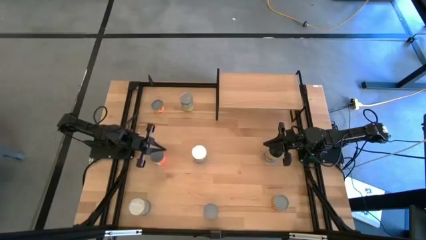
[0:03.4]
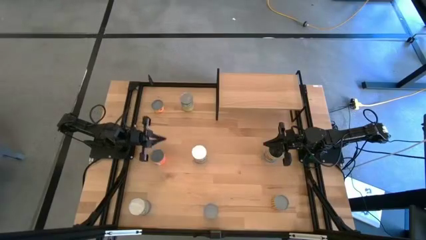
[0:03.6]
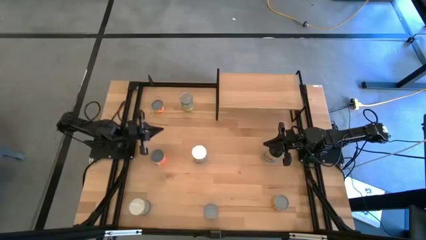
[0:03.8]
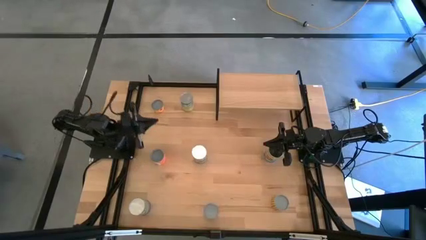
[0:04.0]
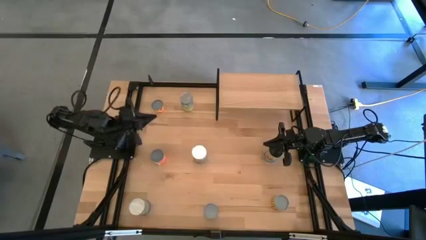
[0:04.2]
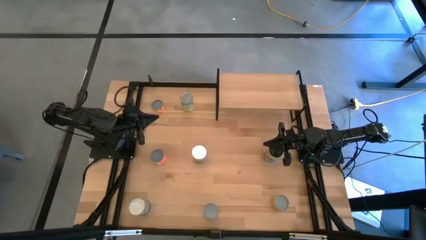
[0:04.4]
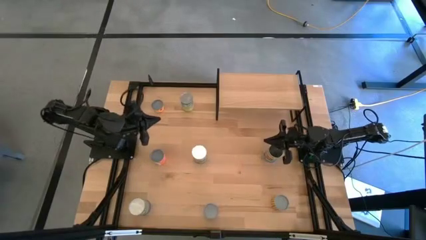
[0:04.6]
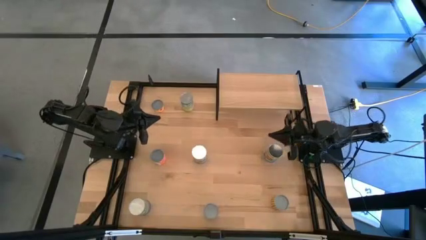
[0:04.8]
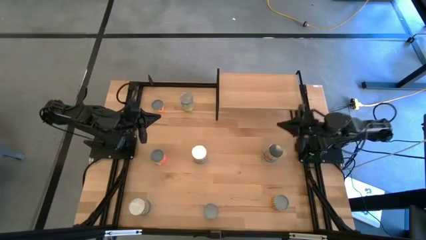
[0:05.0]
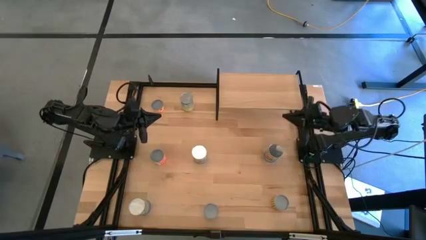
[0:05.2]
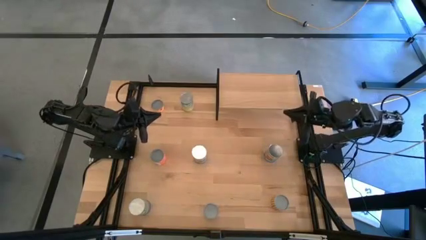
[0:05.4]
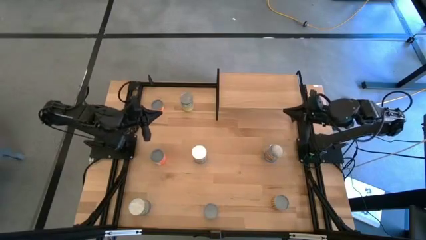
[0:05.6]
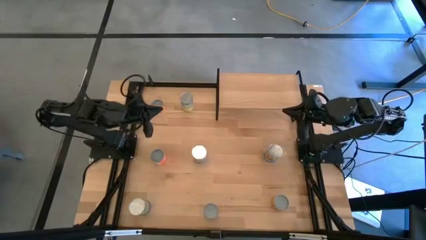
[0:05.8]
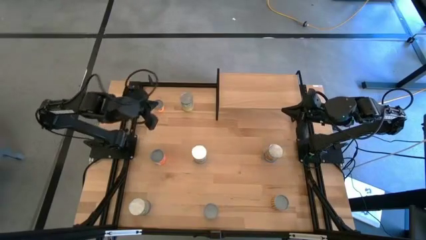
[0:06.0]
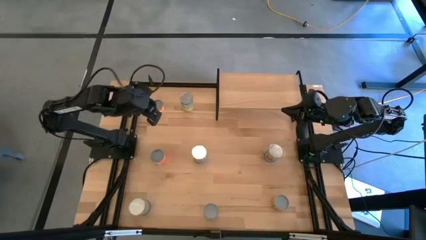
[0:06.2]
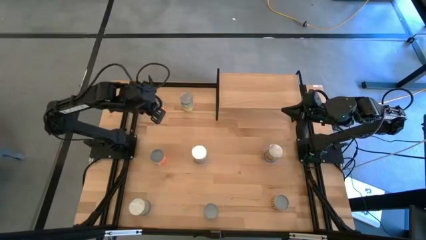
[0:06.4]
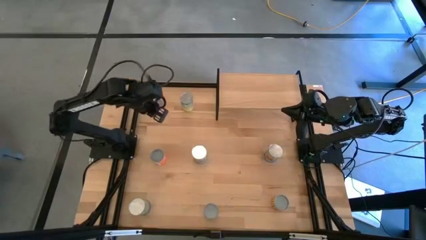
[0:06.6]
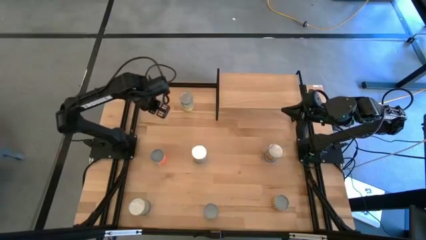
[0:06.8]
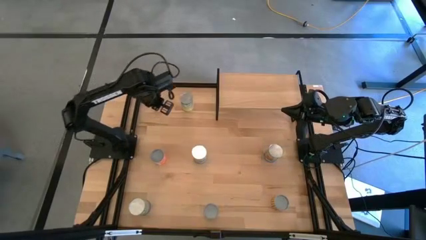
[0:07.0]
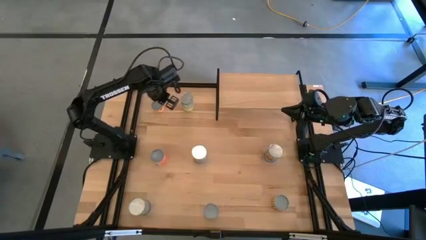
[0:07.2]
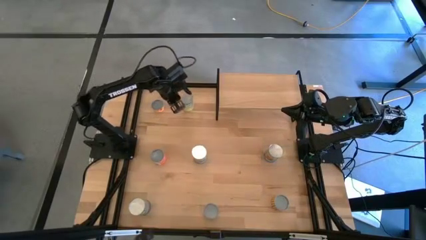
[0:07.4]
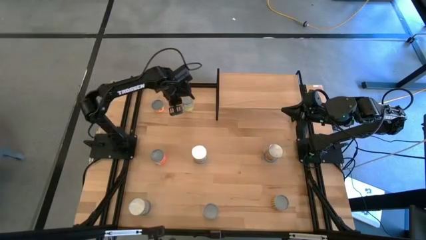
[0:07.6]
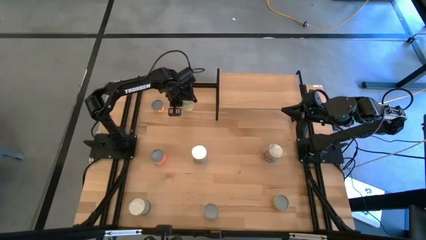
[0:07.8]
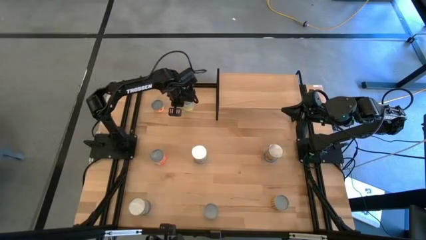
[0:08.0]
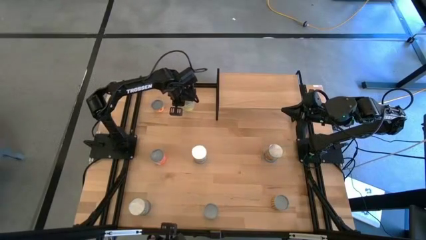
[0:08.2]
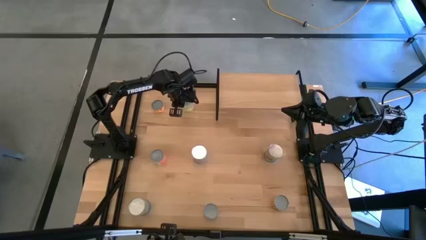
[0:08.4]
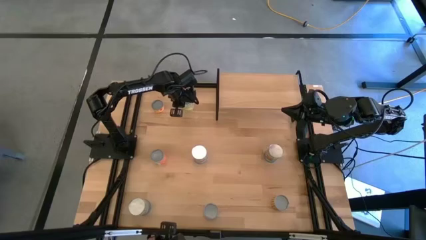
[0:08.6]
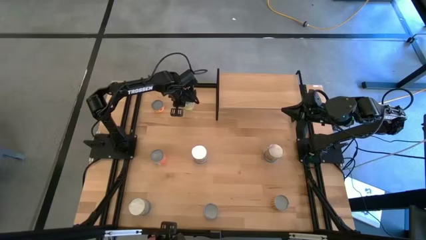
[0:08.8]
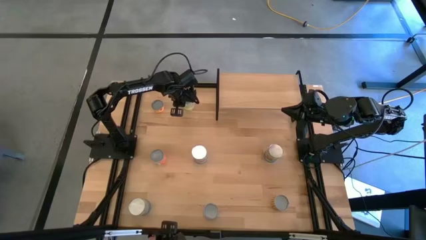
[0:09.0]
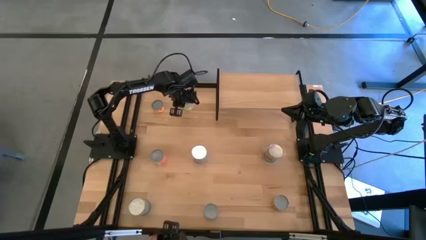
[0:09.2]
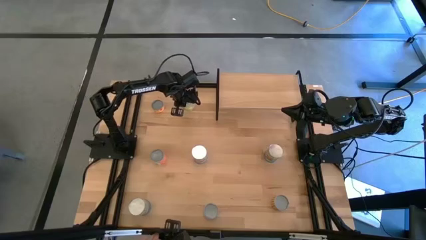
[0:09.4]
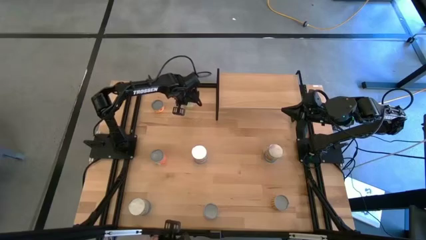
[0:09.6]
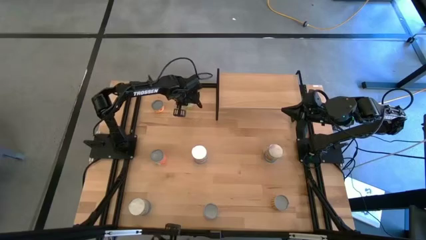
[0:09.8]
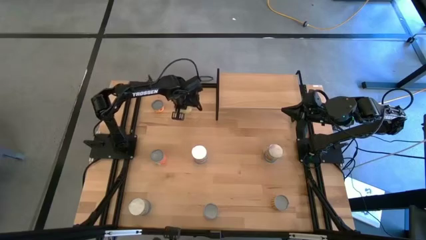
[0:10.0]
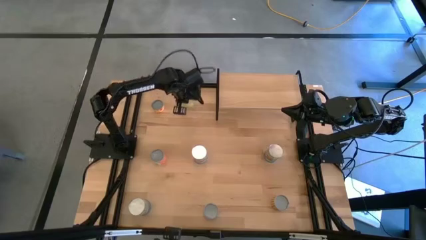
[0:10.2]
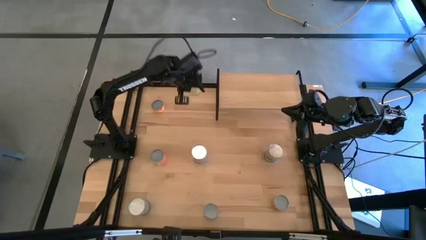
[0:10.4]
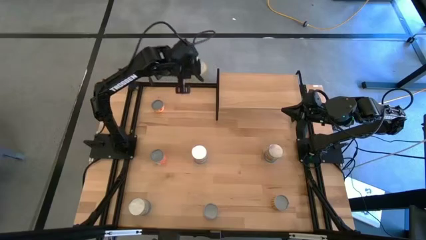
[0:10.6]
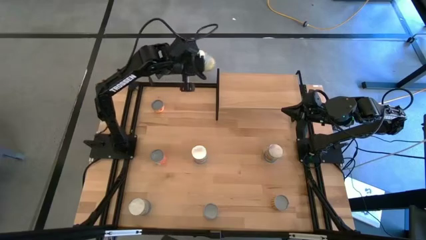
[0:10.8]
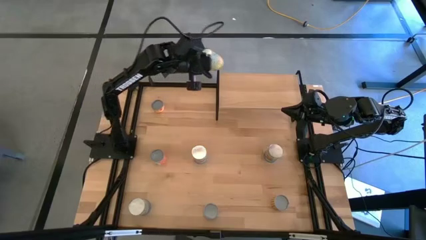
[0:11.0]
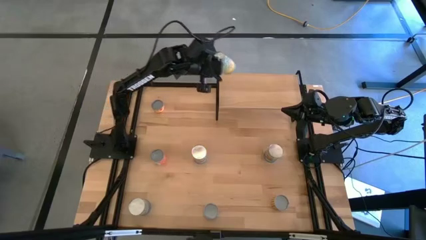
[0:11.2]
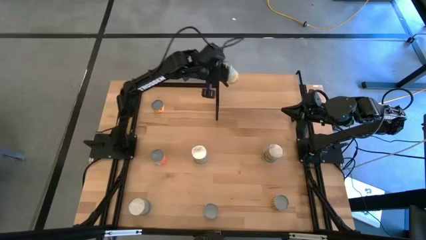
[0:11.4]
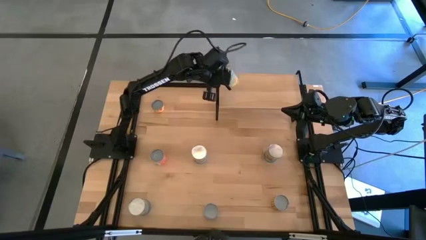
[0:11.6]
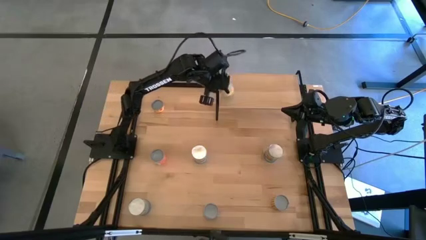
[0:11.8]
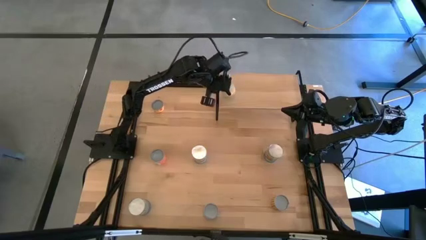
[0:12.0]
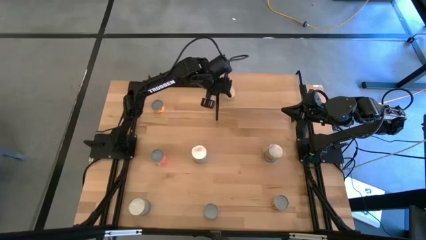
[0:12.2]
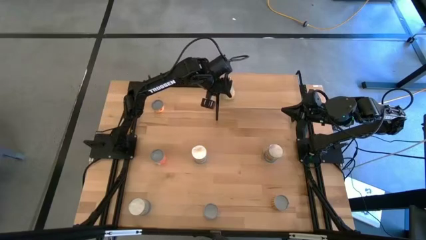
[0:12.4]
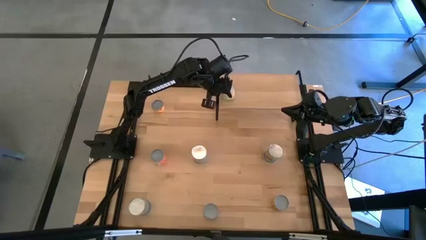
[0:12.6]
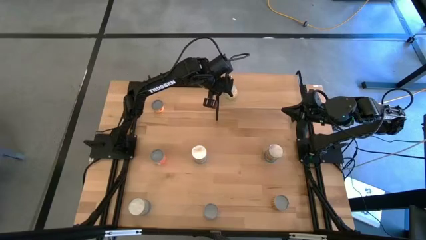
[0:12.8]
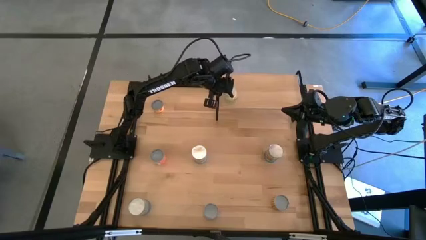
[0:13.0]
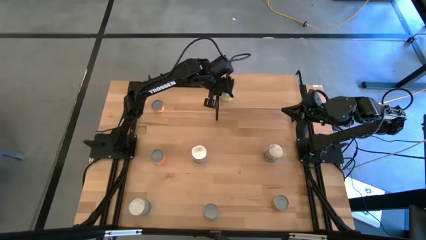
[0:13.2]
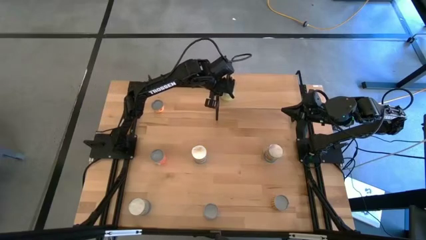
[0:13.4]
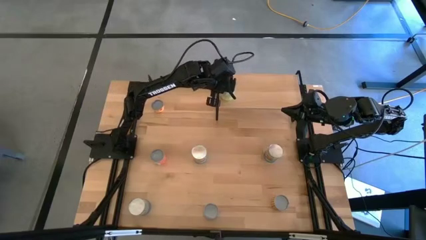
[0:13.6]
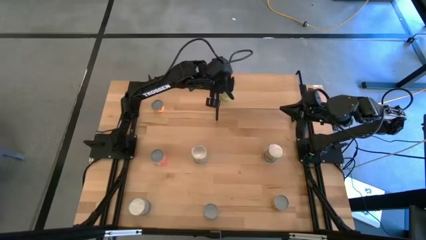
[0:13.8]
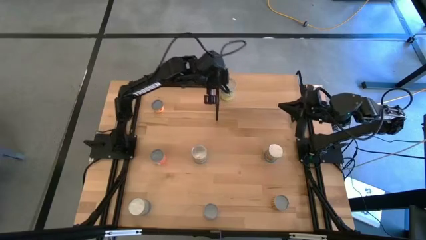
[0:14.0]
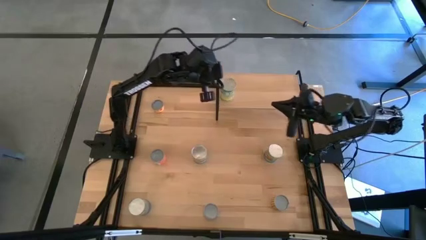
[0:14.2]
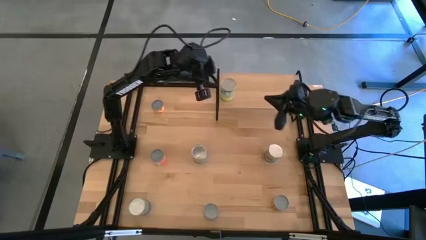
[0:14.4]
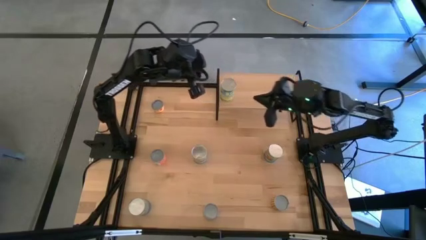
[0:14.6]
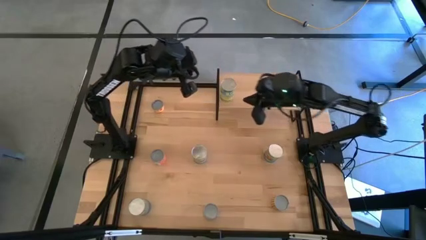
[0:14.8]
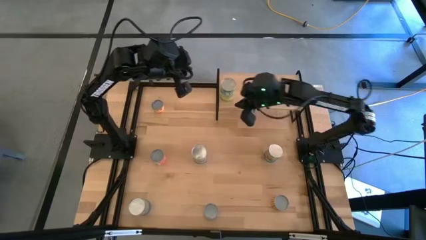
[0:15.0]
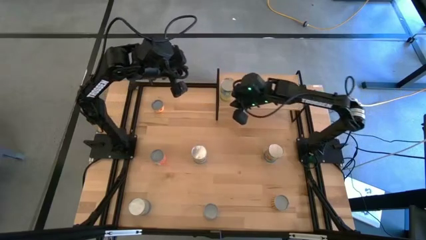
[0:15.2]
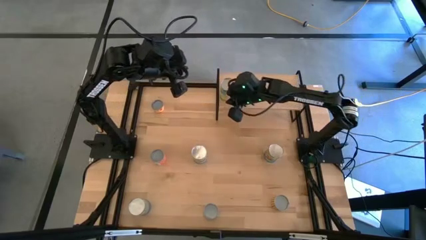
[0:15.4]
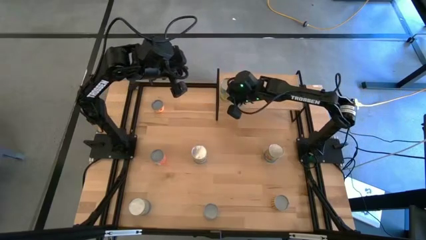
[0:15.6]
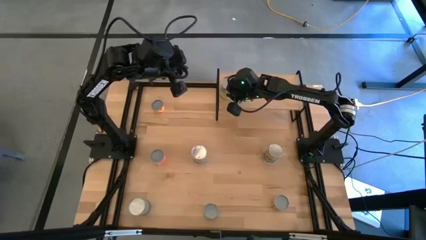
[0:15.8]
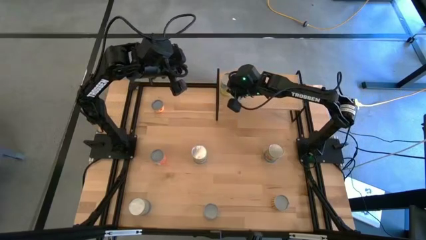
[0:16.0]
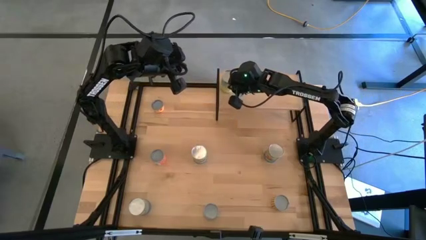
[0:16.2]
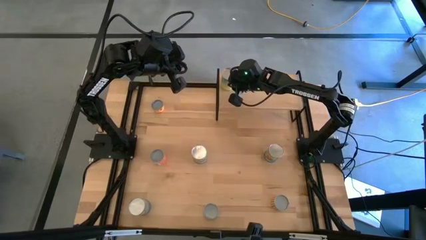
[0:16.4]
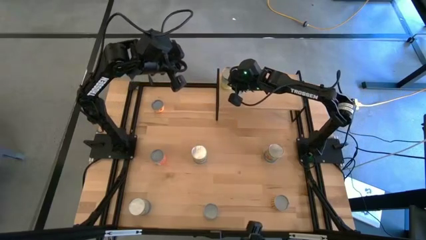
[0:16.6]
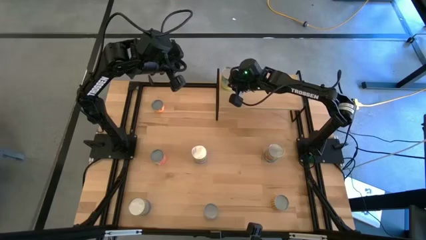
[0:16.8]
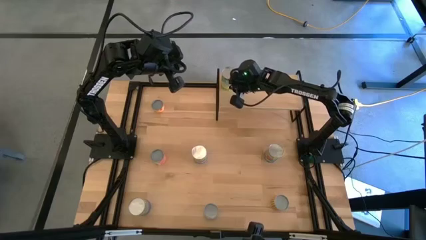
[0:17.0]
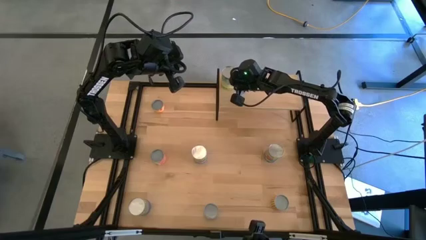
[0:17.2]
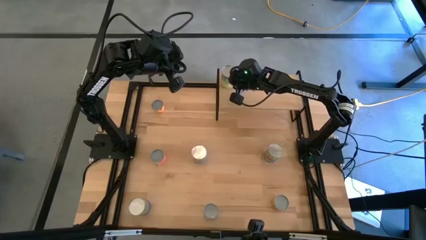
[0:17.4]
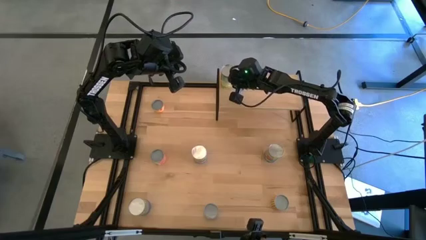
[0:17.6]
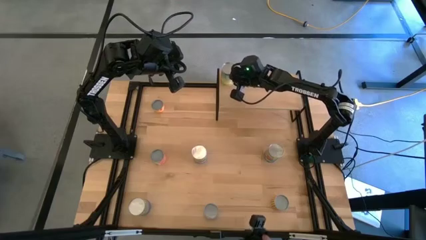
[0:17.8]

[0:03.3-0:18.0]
Task: Pick and place cans onto a shelf
Put the canned carrots on the shelf
